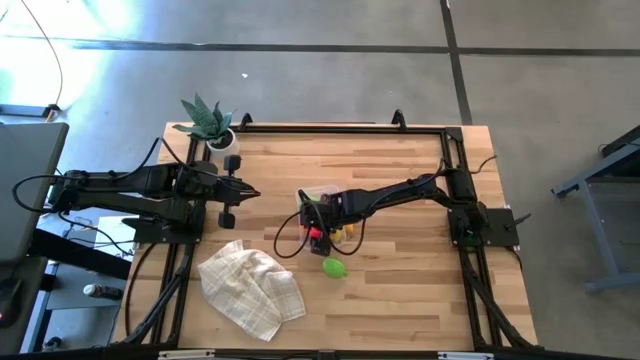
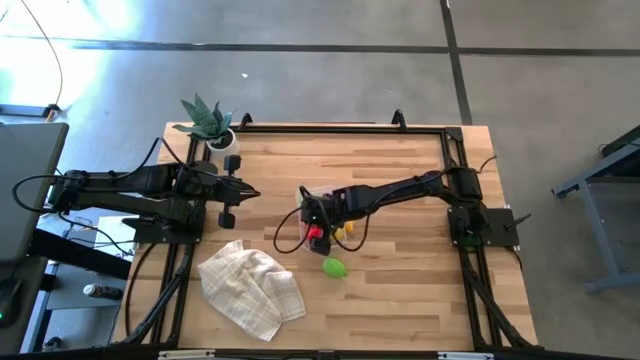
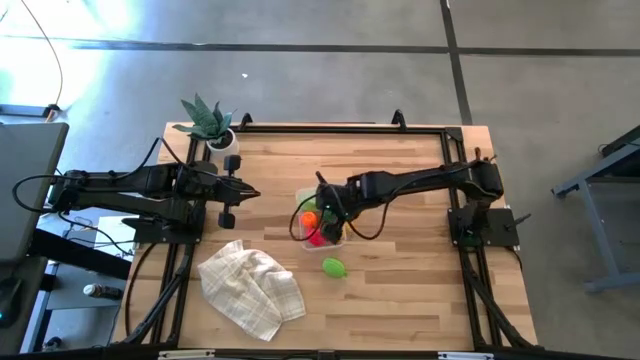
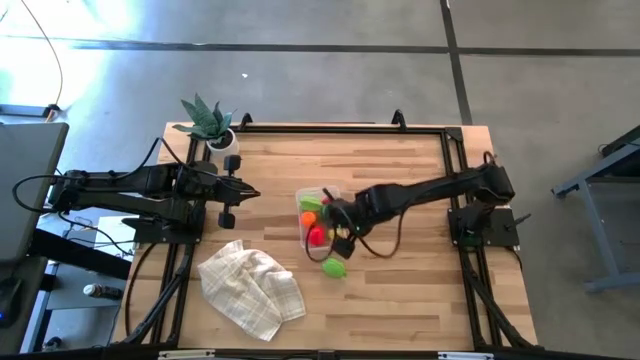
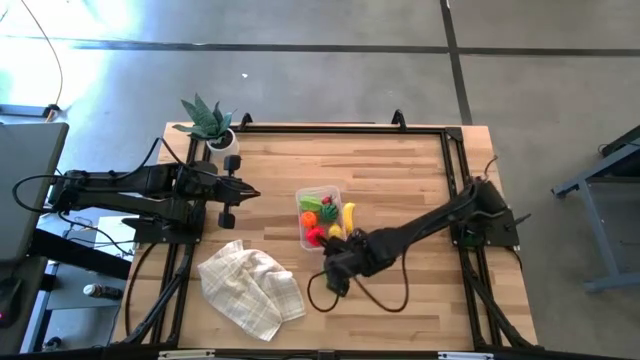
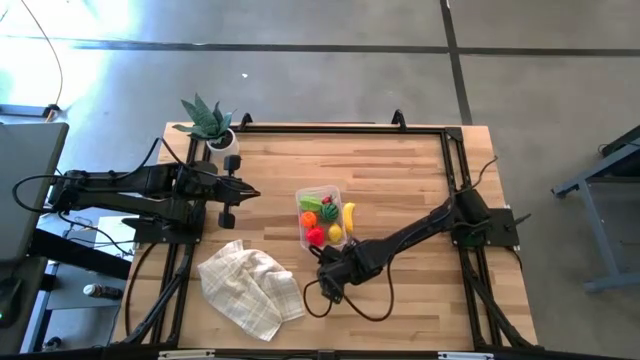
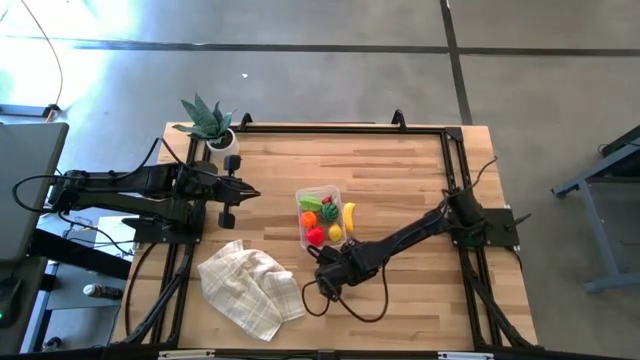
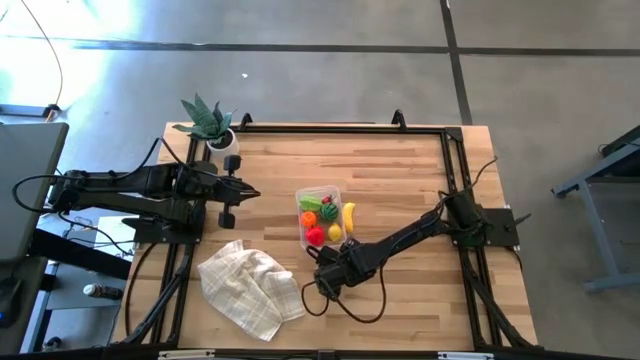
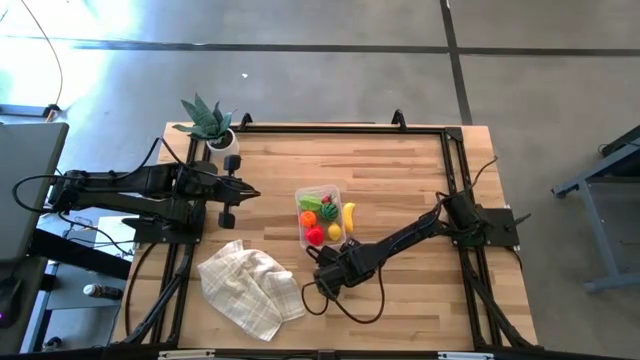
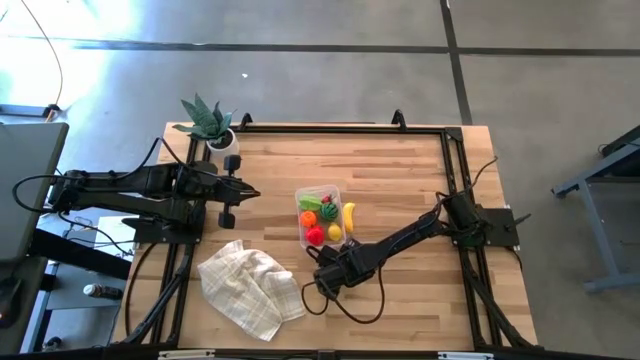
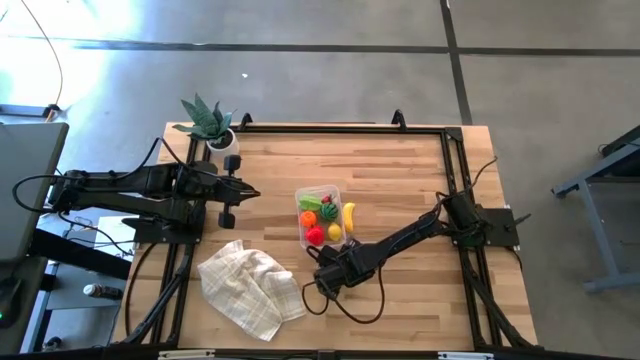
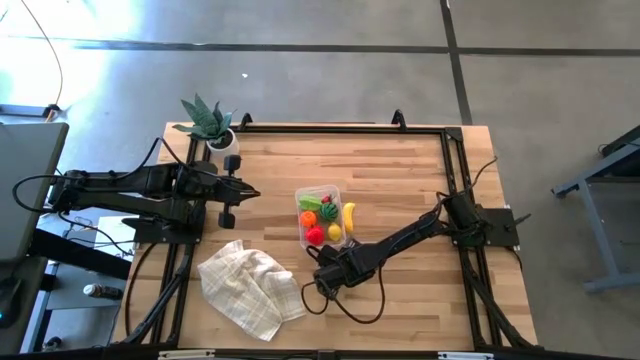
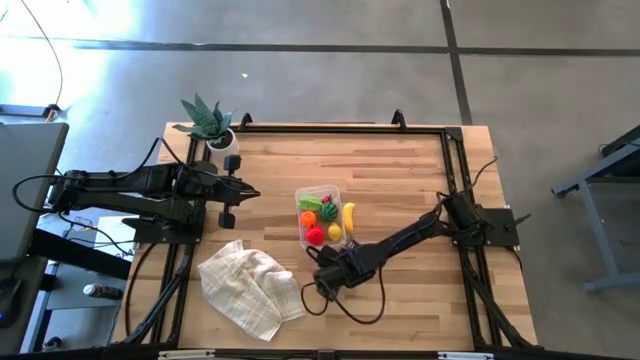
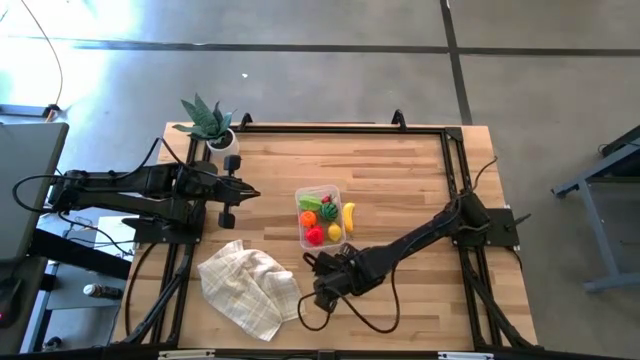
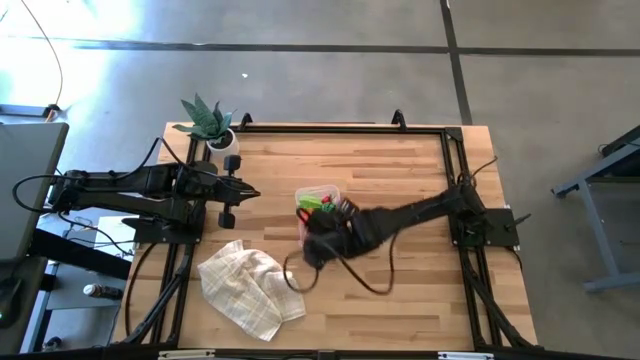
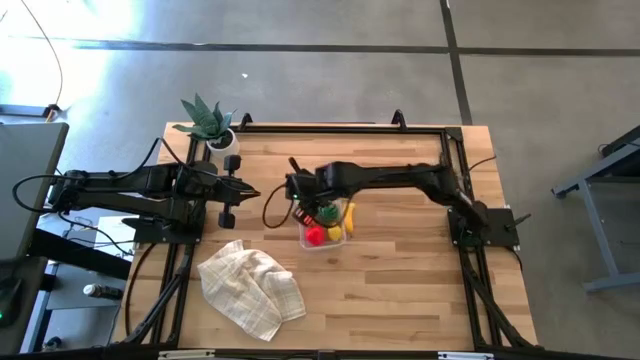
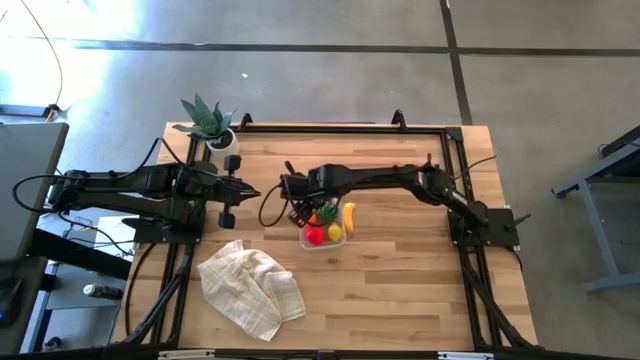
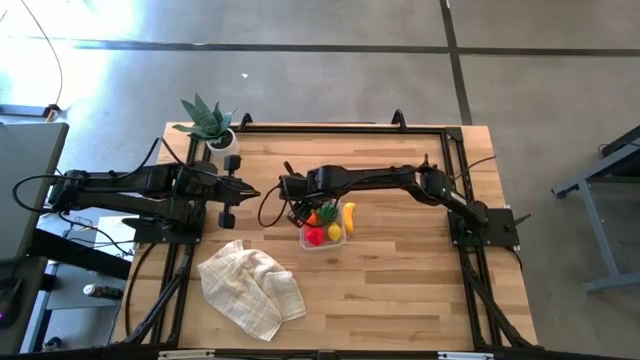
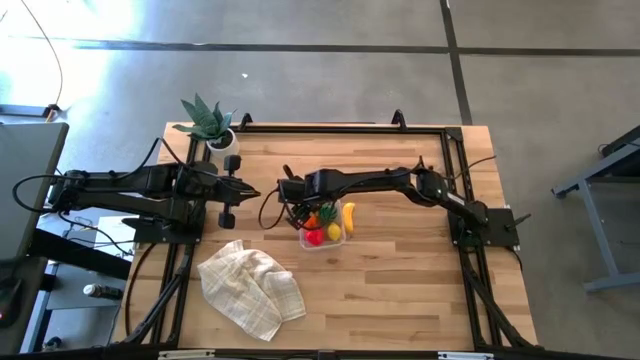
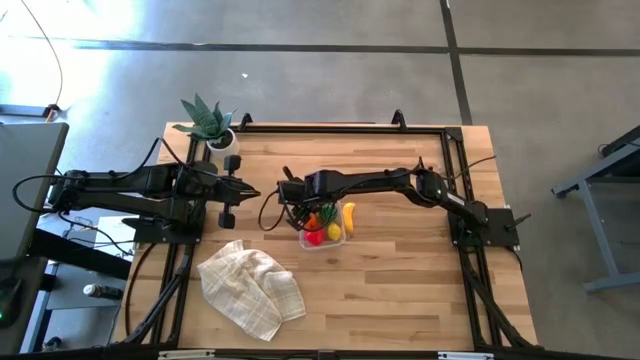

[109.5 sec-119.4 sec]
Task: Pick and placing Produce into tupperware
Put the green melon into the transparent bin

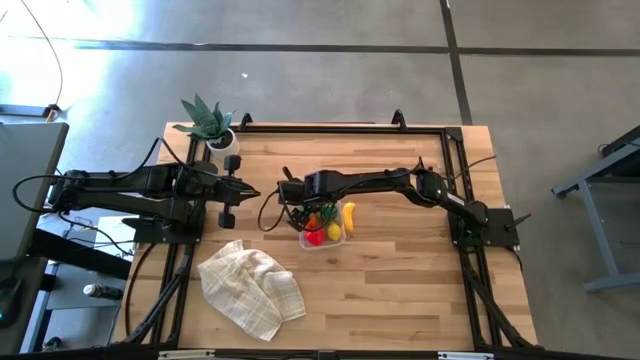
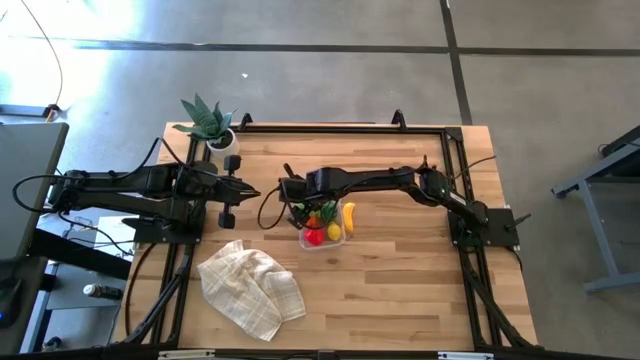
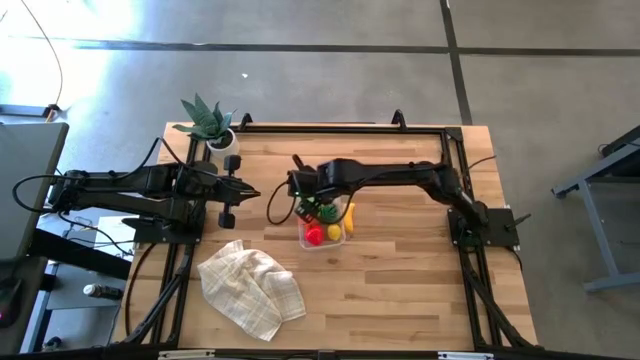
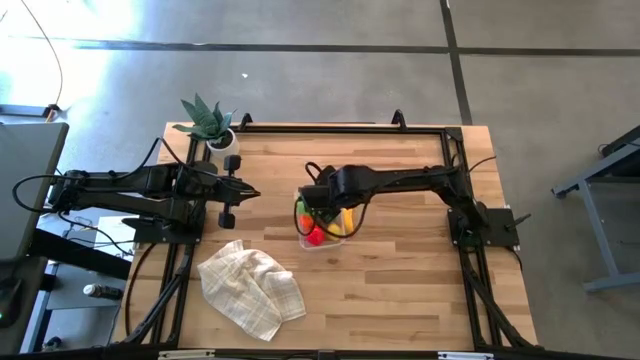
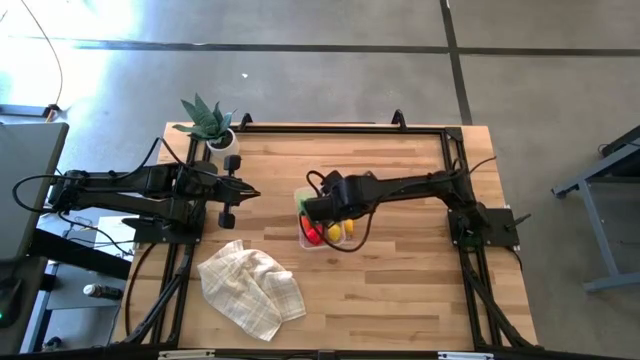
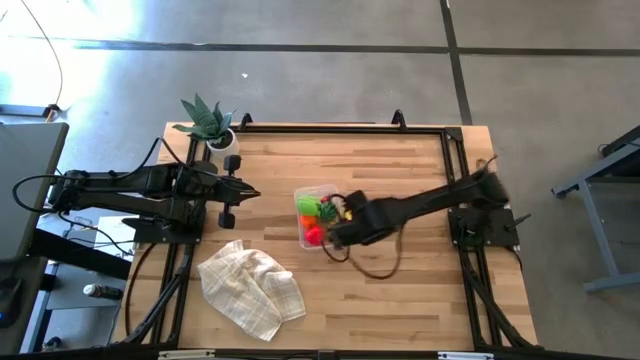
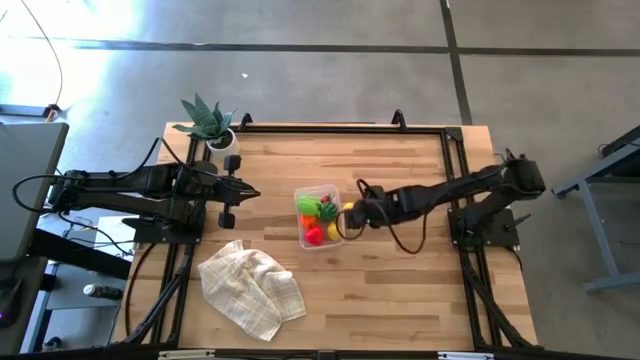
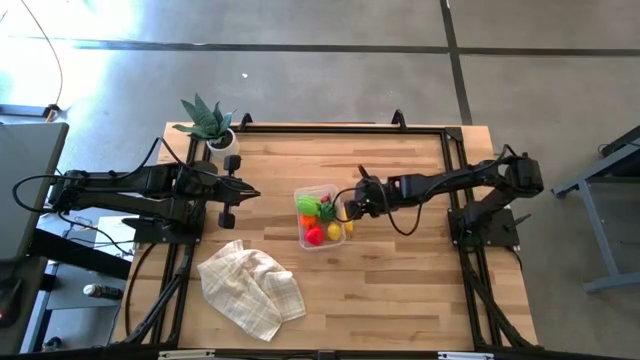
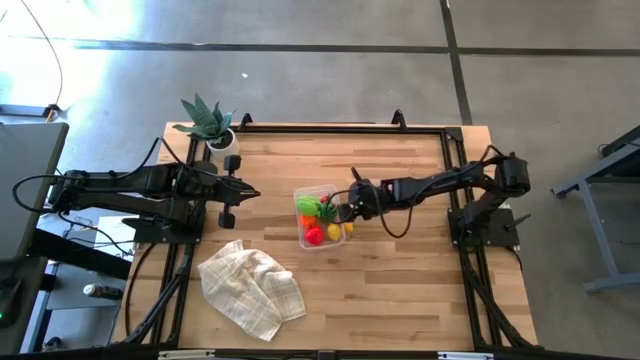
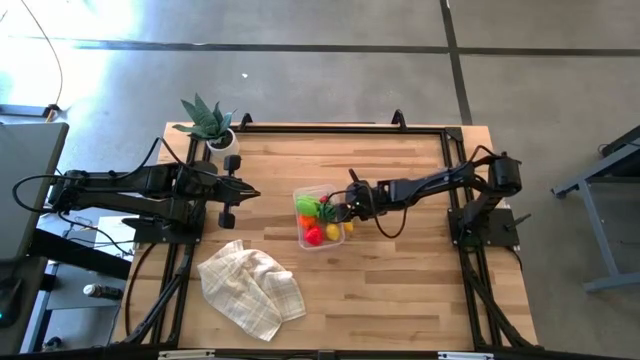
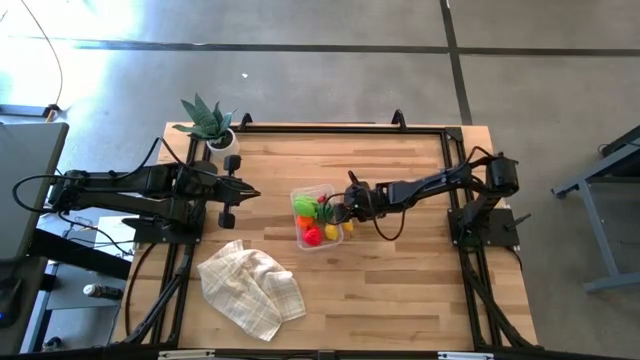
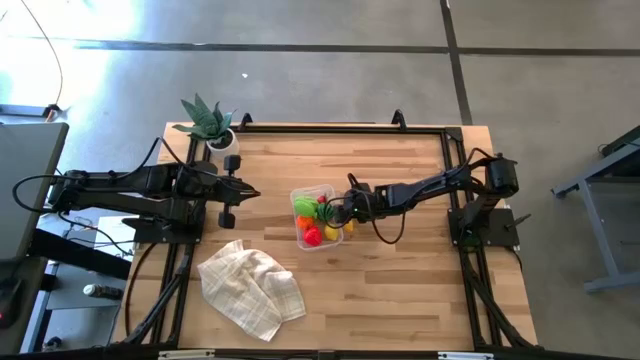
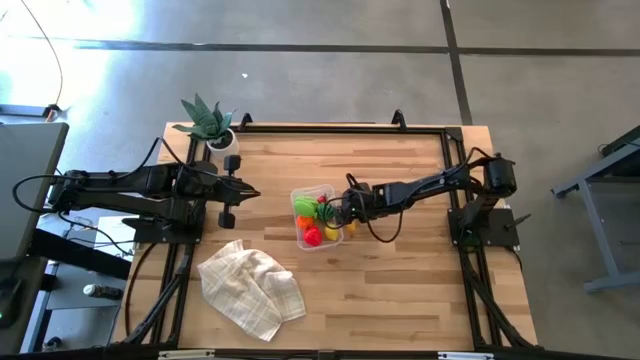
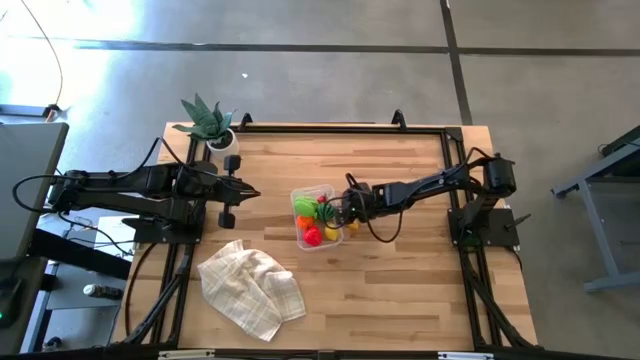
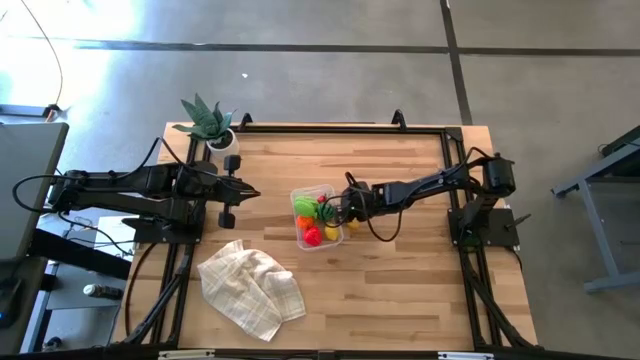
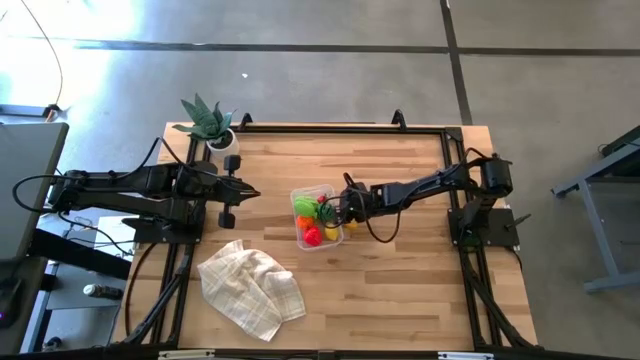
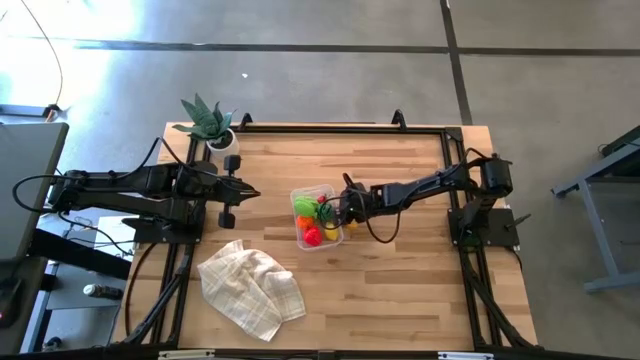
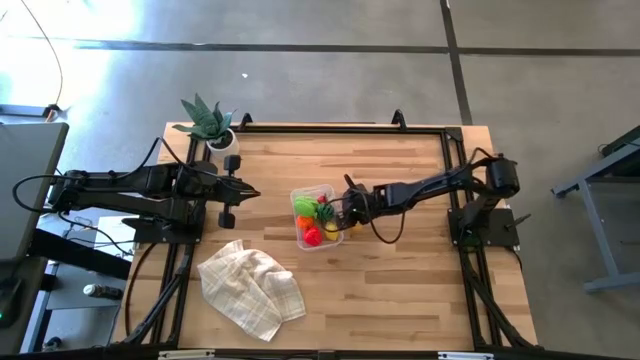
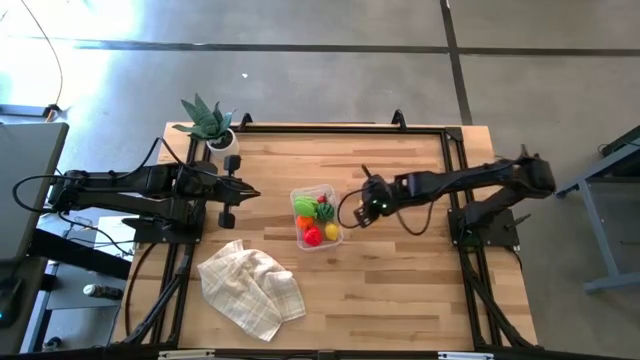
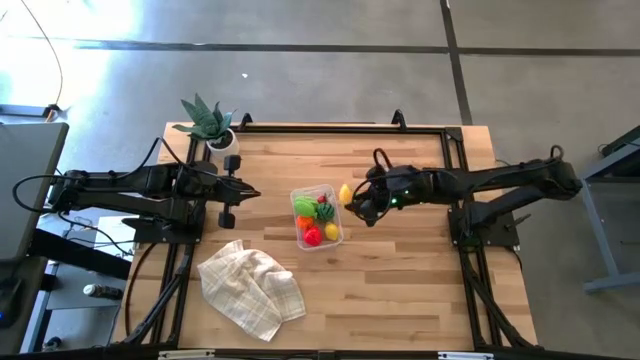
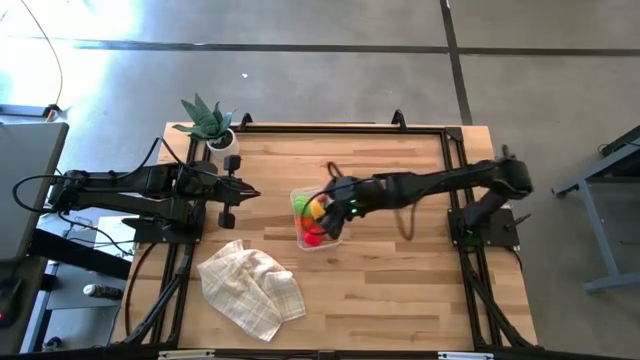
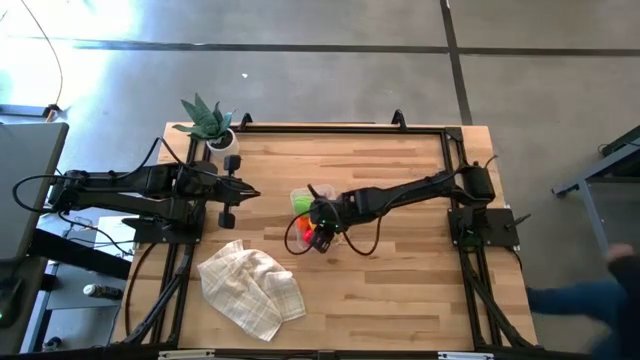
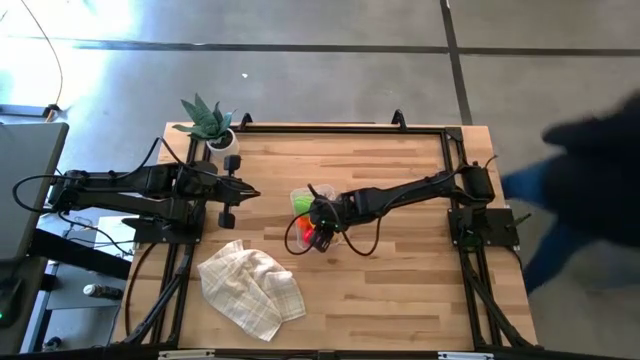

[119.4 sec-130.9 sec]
Put the yellow banana into the transparent bin
